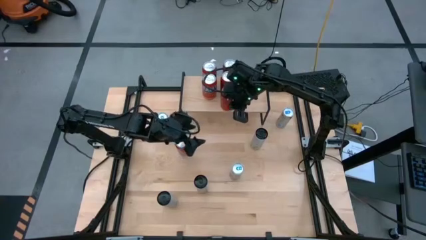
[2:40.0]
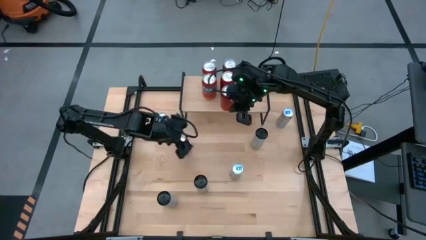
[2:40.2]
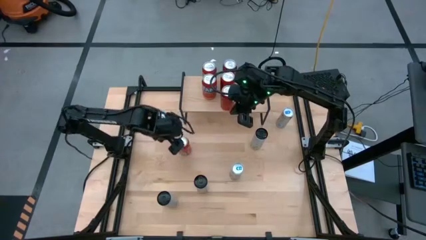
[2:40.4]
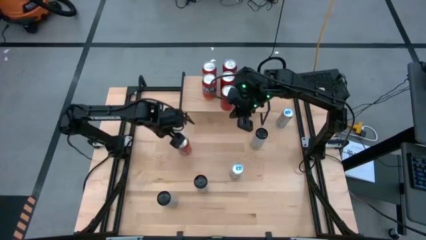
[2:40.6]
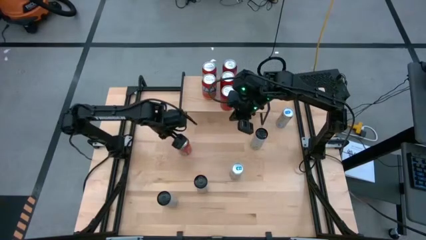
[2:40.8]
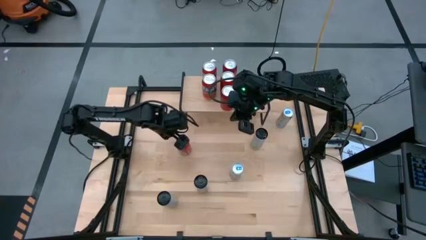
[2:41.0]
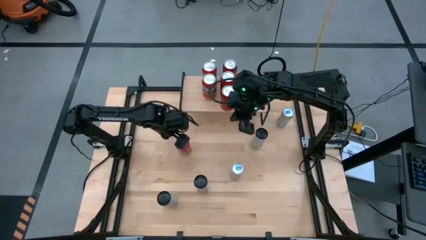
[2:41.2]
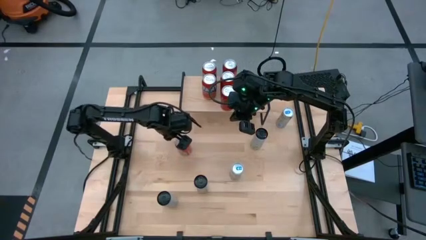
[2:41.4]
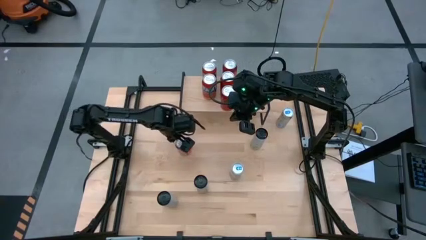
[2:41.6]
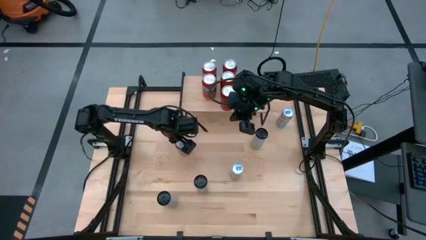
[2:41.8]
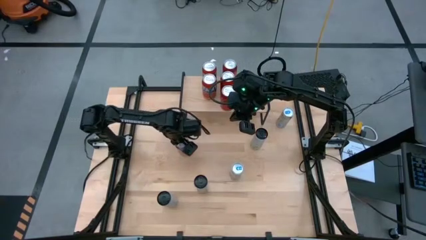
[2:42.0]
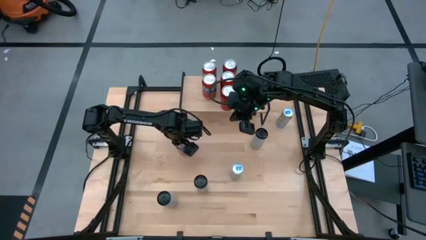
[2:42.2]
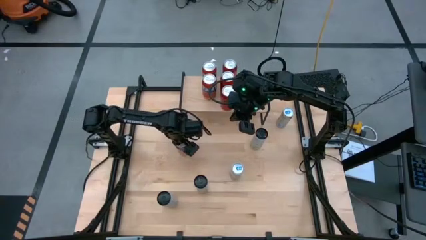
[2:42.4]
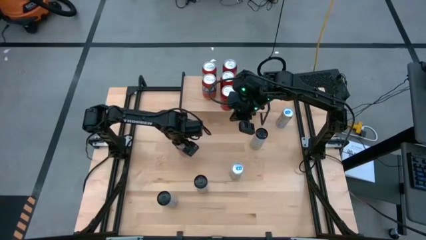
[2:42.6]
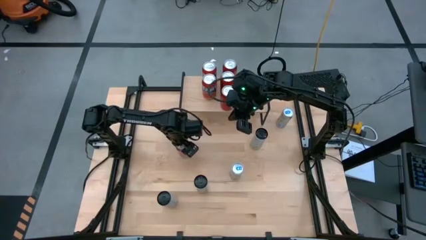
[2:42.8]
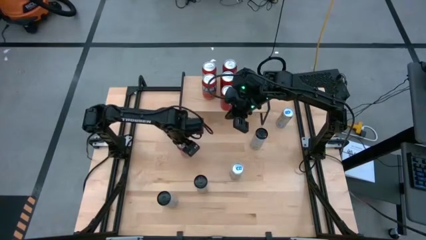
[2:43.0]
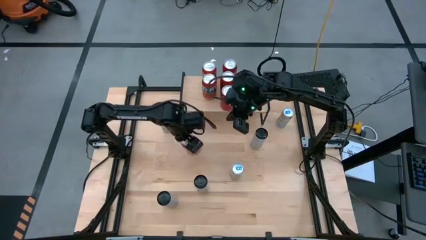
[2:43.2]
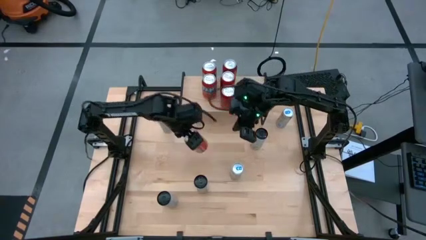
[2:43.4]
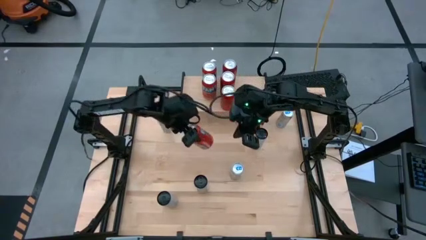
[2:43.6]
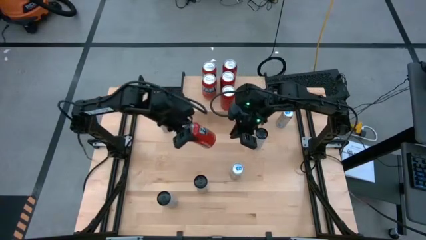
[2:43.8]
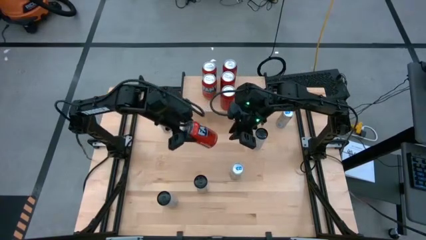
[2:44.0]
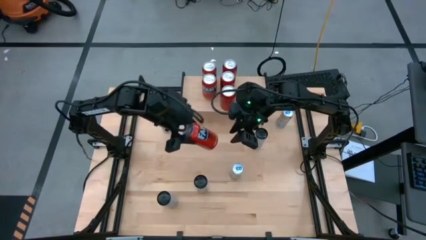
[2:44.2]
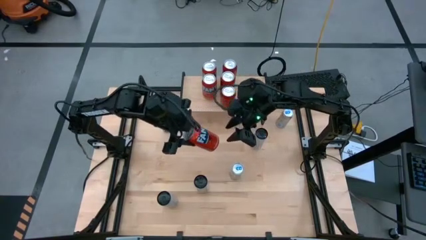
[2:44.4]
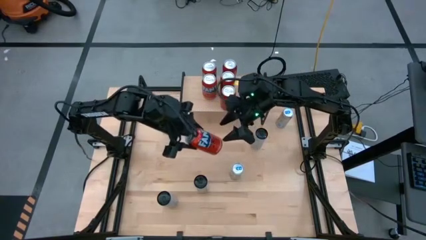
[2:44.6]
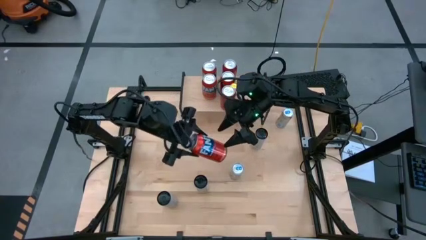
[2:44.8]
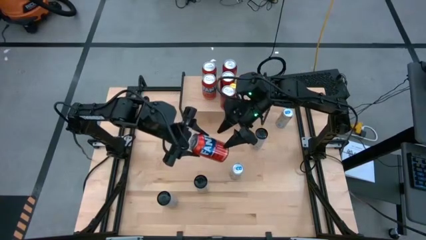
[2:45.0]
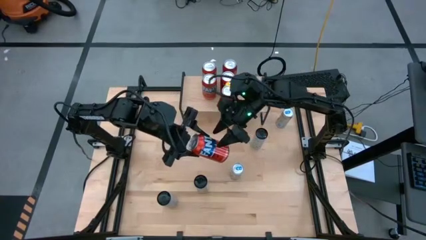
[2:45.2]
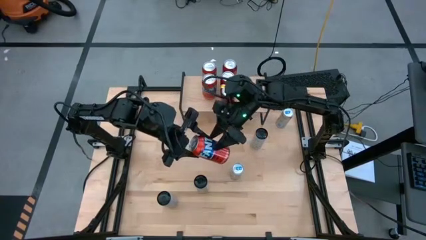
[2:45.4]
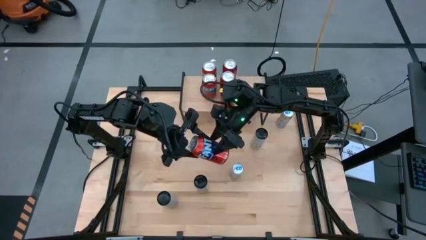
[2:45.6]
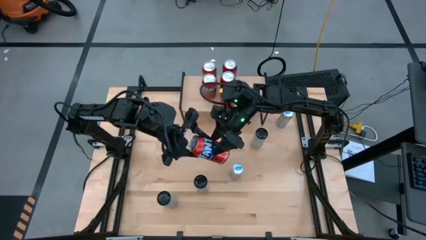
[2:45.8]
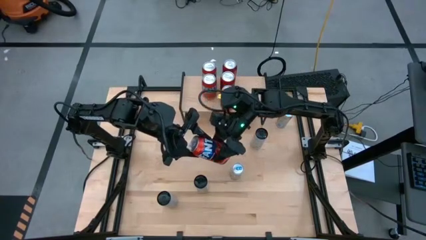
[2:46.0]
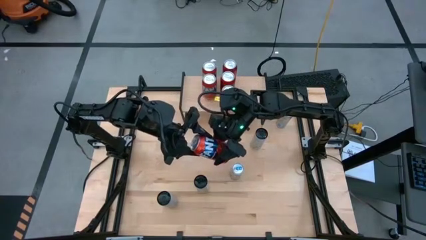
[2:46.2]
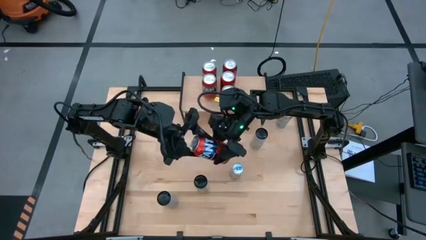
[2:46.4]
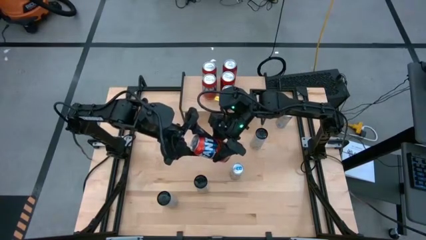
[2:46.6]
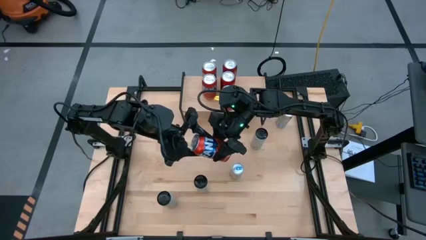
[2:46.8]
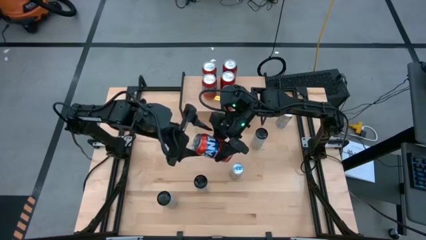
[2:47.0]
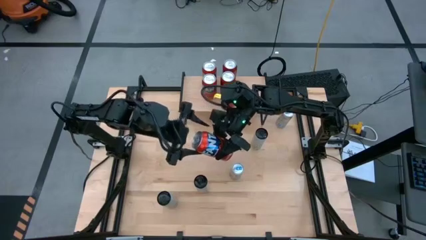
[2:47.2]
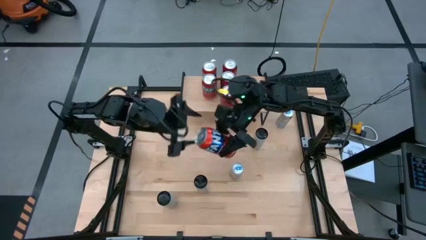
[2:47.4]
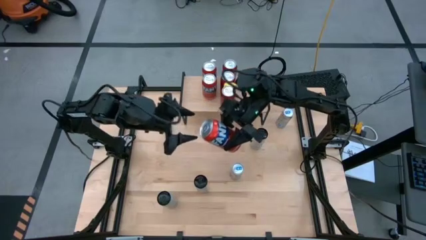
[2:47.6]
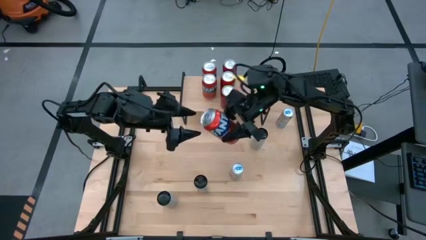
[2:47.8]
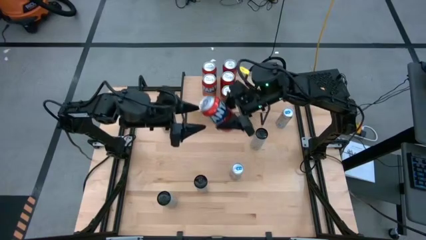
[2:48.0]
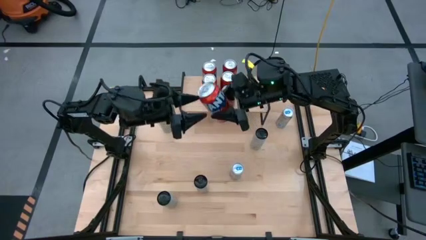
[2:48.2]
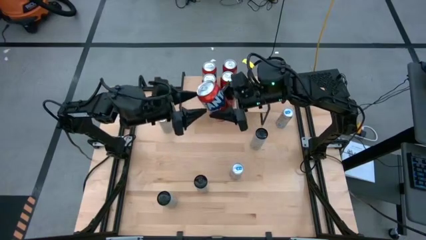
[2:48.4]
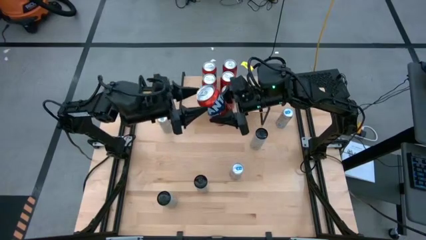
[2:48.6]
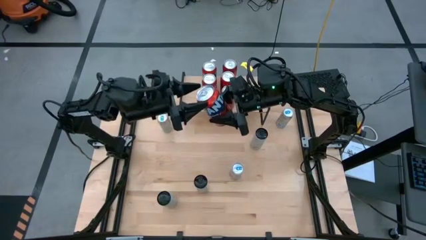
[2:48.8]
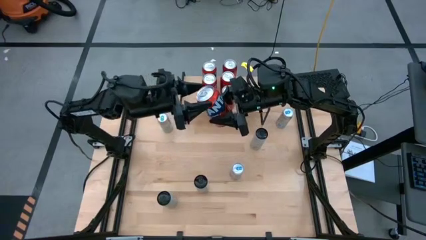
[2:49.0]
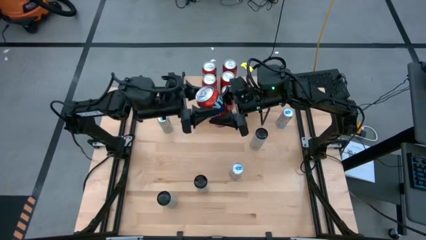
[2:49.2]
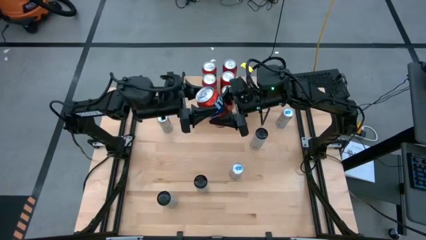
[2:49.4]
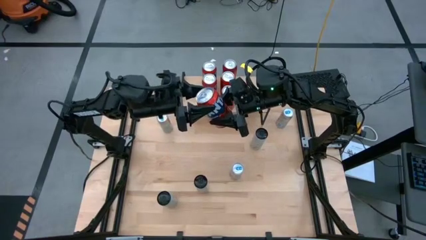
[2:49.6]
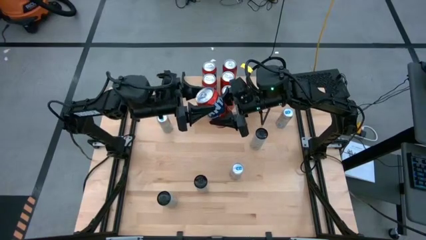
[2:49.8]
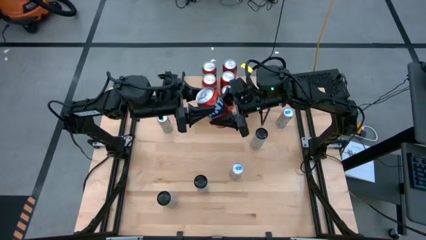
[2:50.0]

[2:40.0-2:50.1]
Task: Place canned beverage on shelf
Put the red soda can on the shelf aligned with the other red soda can

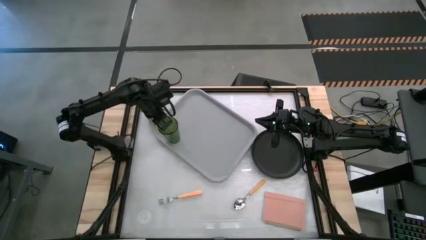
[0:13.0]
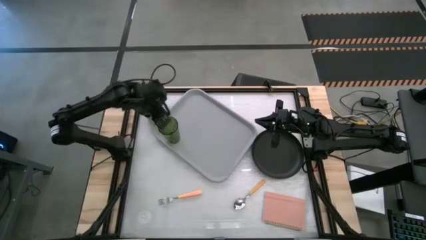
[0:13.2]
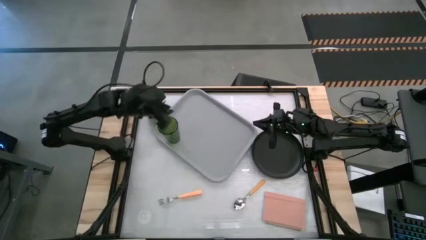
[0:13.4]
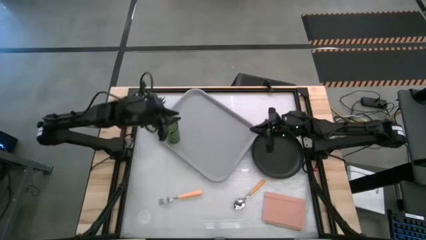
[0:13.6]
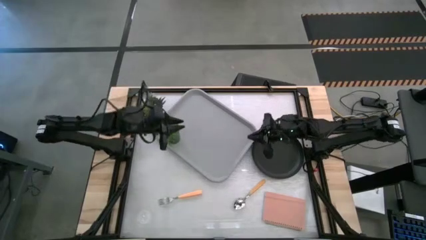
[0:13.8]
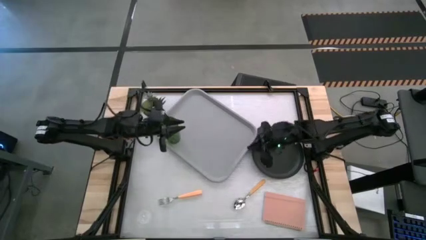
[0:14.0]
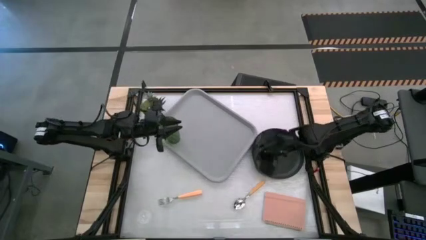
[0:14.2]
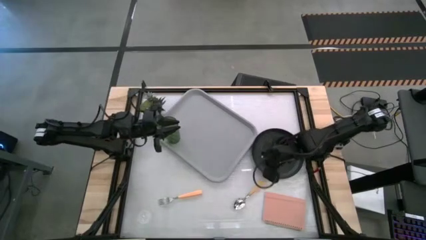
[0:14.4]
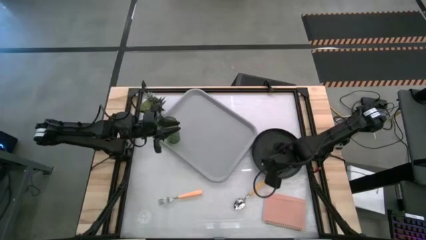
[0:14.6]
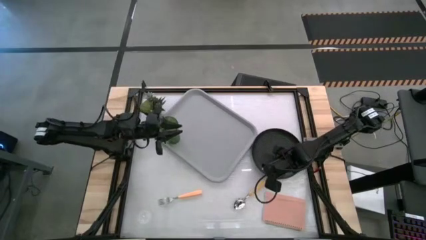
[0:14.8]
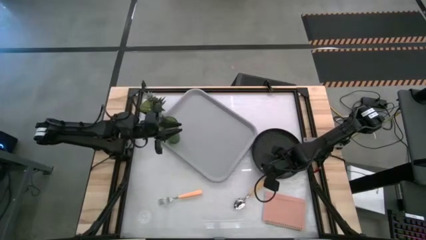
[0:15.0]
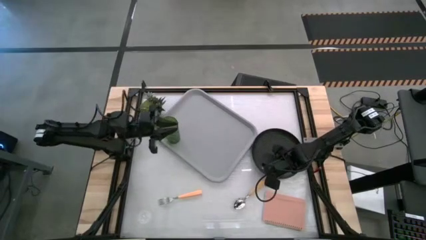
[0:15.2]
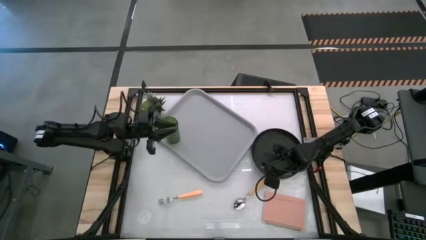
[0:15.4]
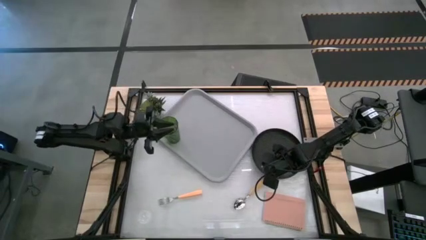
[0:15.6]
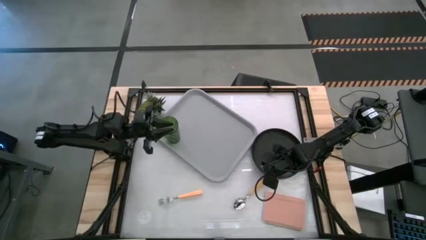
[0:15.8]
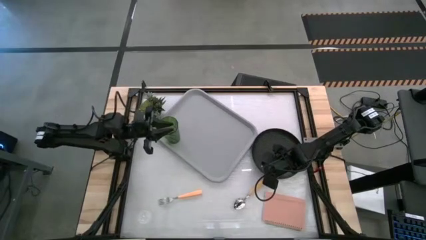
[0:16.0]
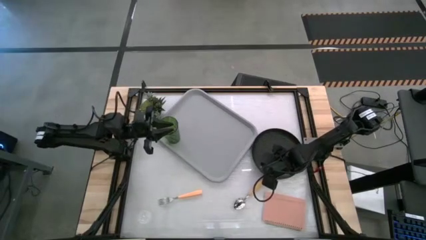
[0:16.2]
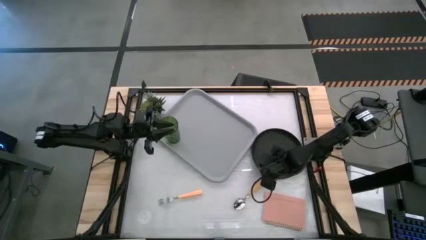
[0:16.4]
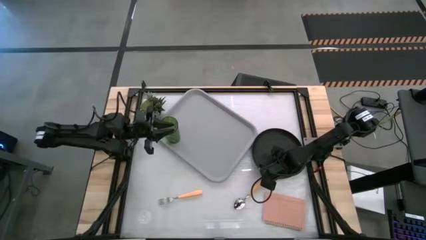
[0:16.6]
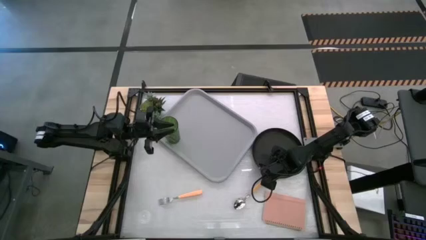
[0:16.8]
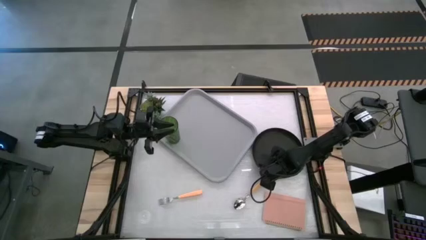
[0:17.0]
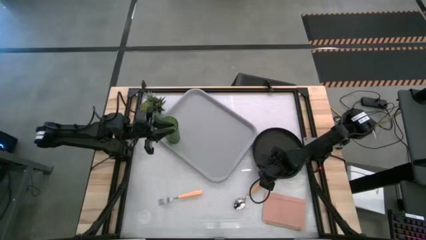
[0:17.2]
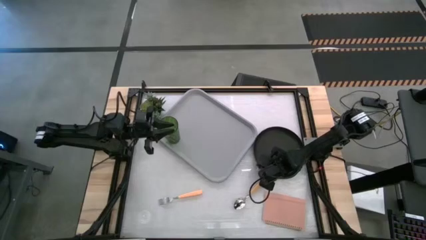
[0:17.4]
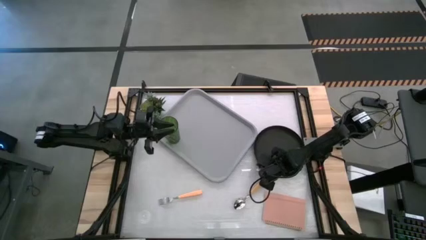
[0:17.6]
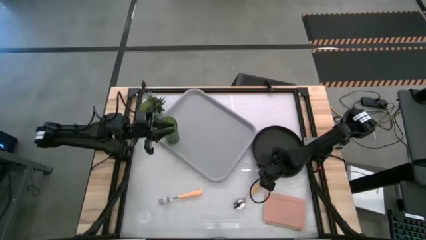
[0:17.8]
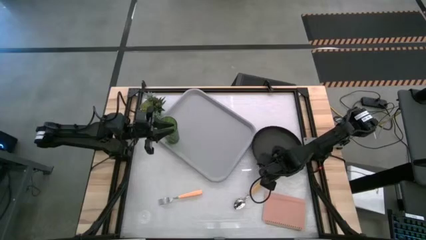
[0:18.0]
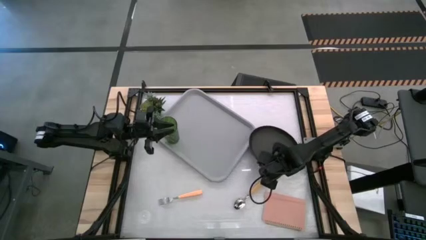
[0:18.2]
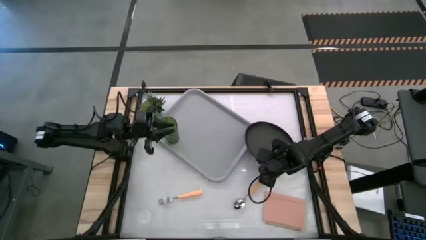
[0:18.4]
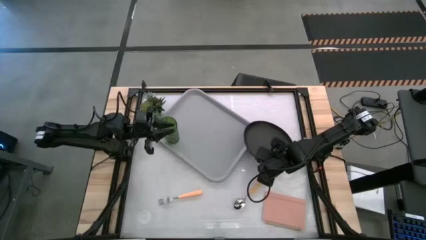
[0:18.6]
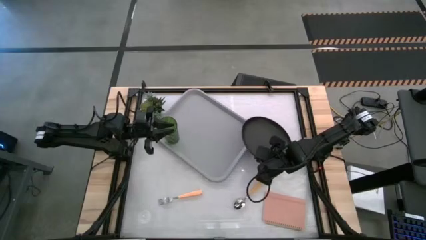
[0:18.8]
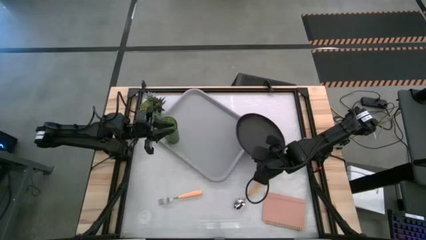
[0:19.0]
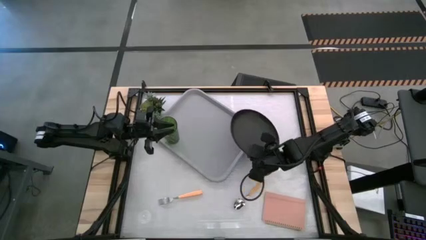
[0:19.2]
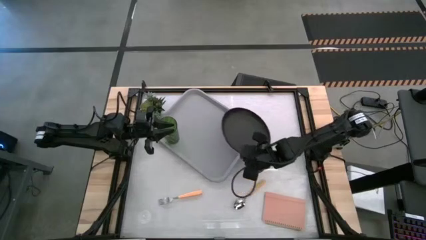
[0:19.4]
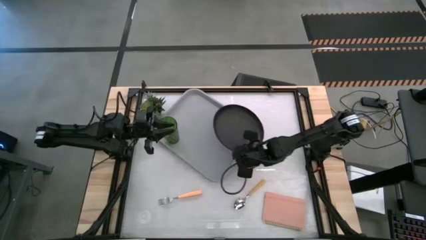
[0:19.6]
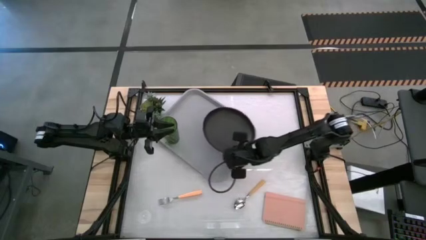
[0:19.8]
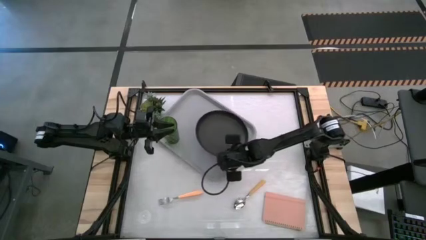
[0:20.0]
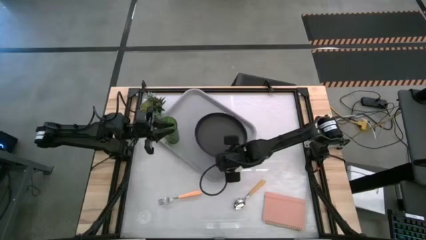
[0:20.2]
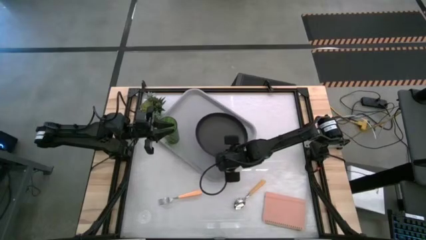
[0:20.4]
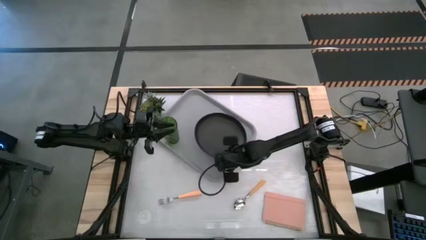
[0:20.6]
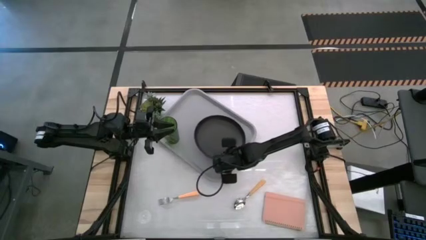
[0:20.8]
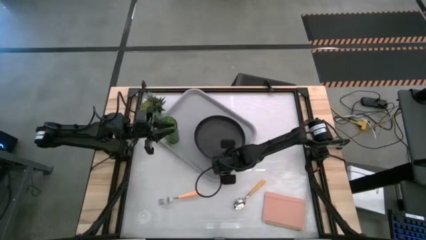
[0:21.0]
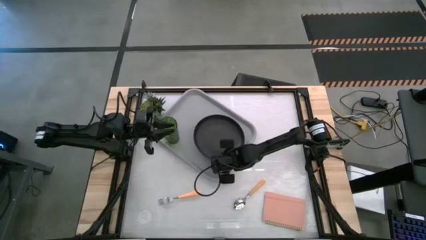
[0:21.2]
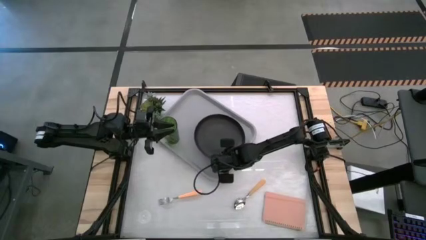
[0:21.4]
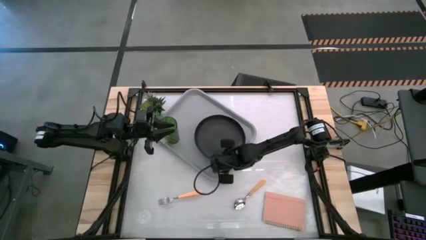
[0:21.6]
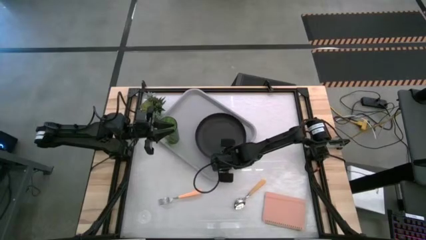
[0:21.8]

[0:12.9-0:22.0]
Task: Pick and place plate/cup/fork/spoon on tray
Put the black plate on the gray tray
